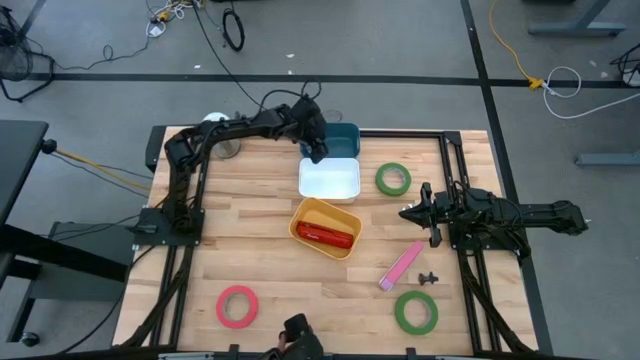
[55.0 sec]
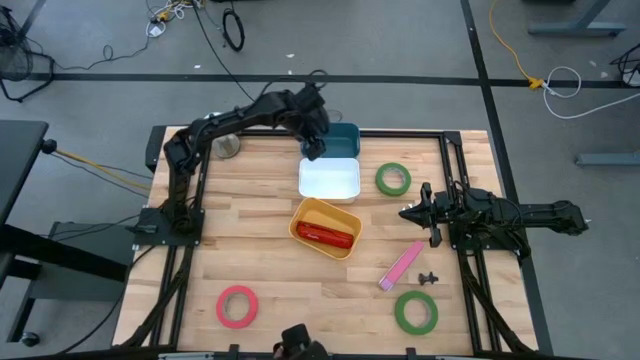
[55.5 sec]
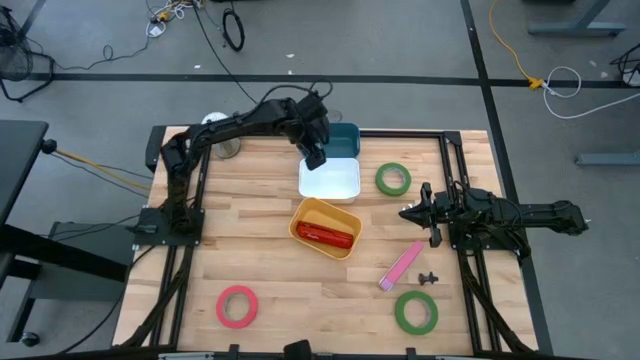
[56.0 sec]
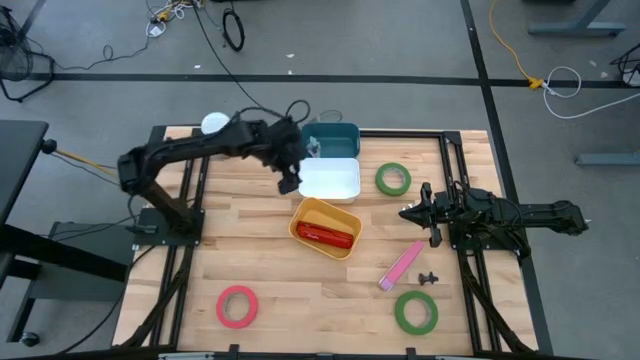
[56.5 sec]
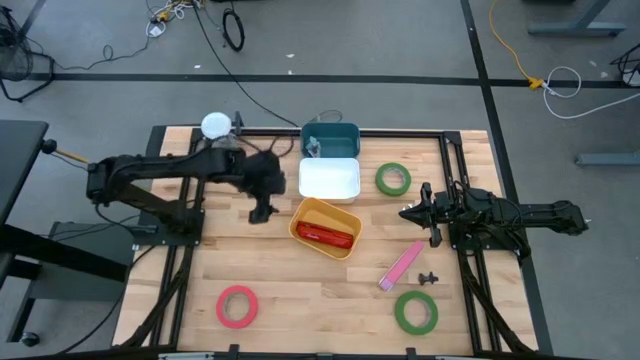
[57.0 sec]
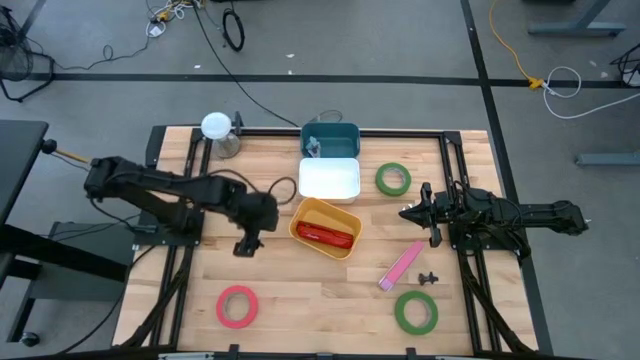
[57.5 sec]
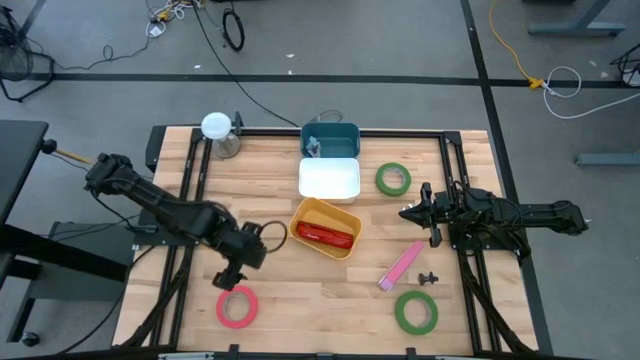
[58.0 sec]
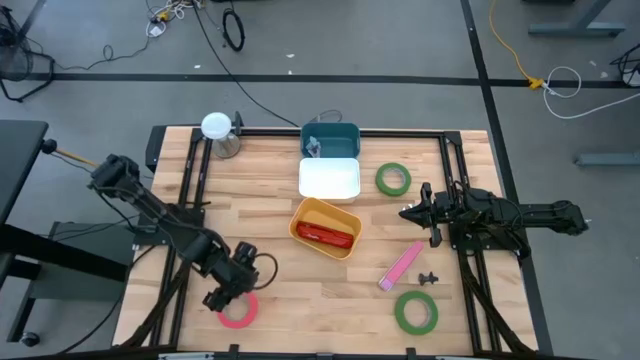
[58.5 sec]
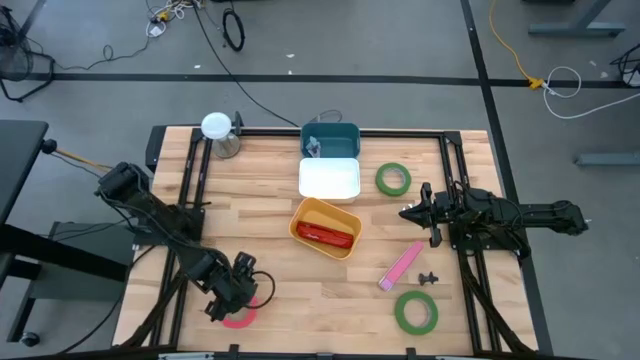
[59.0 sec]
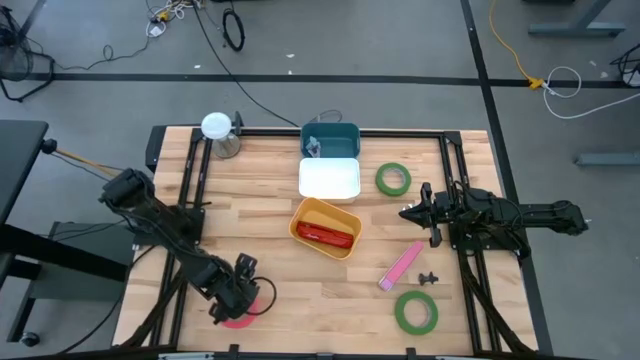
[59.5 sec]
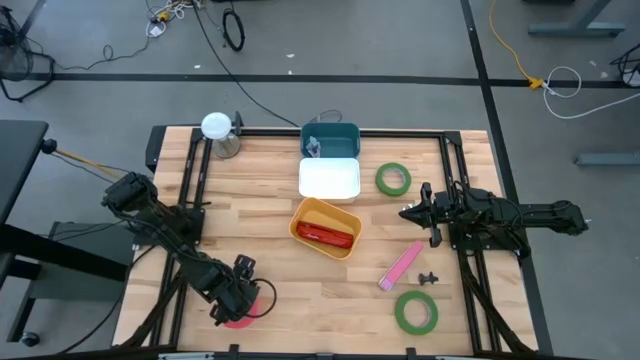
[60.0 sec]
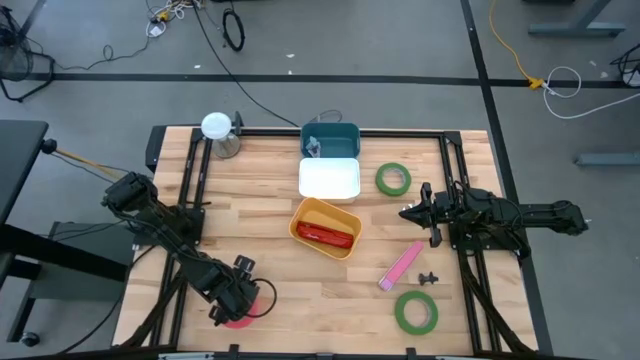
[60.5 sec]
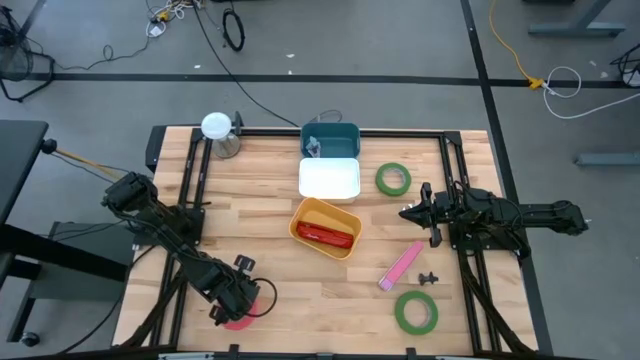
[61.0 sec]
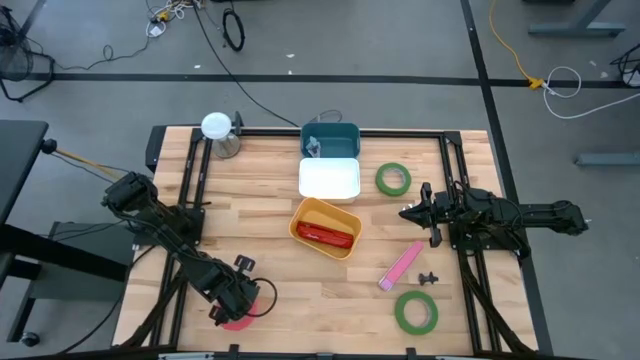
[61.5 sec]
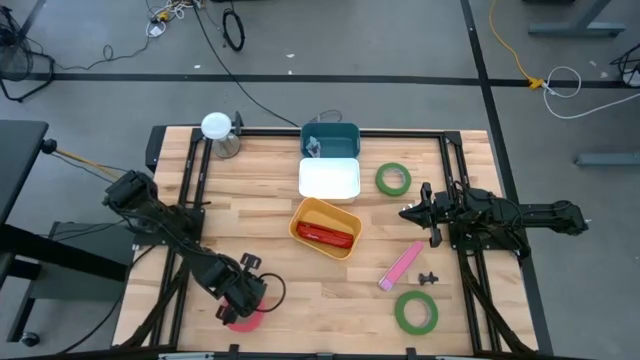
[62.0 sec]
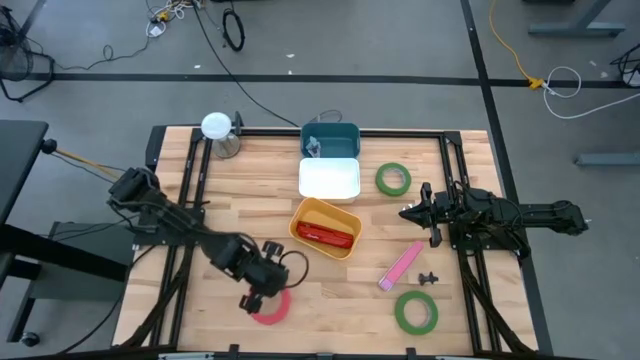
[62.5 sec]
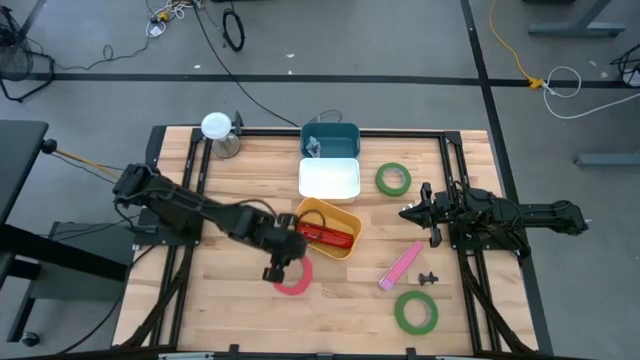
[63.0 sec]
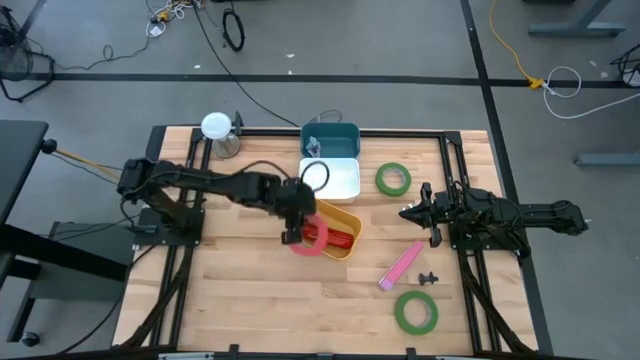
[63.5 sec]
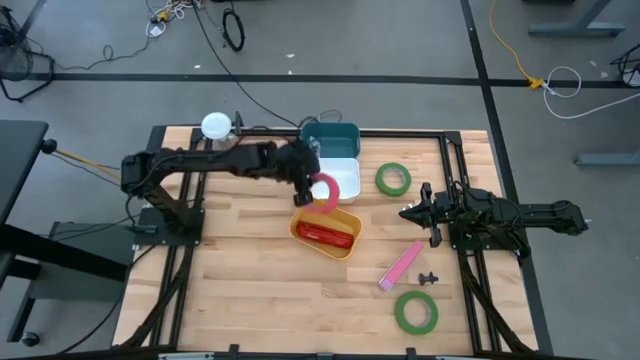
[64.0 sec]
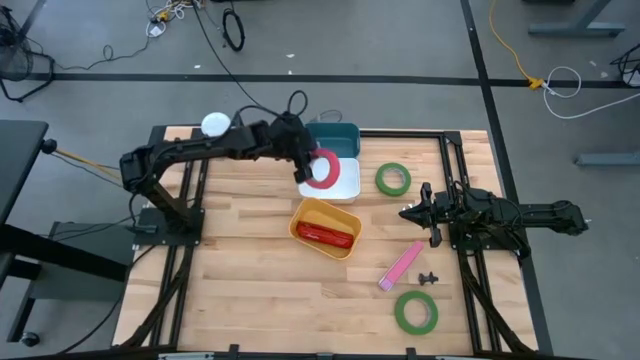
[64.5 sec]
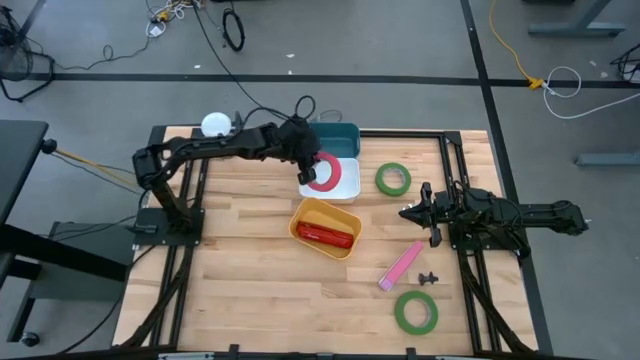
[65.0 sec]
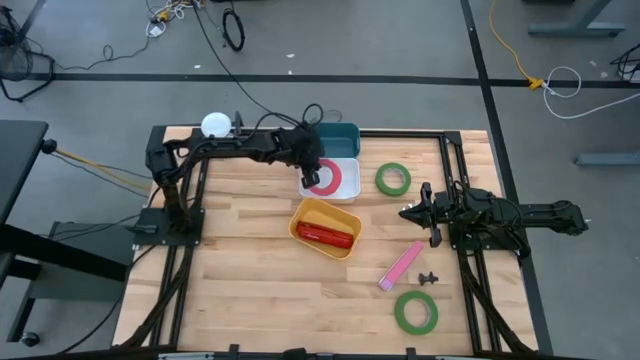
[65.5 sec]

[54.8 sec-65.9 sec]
Task: Pick and place Stapler, Stapler remover, tape
Put the pink tape into the white bin

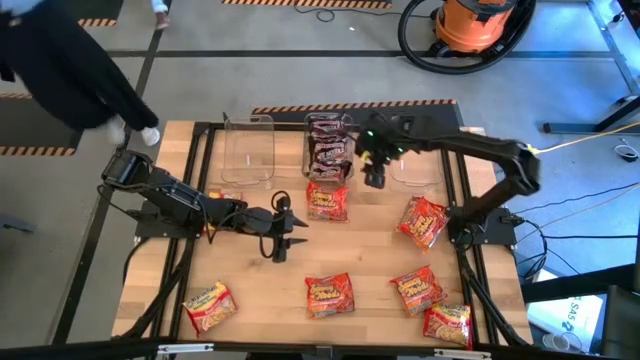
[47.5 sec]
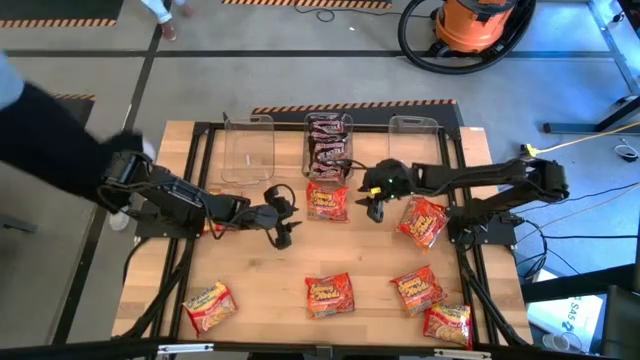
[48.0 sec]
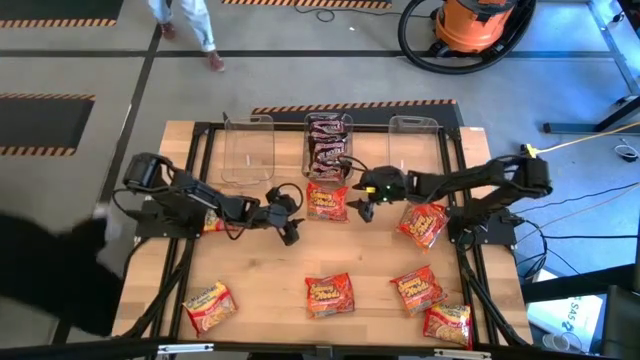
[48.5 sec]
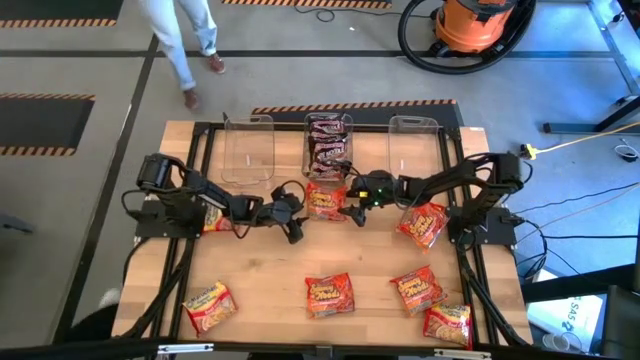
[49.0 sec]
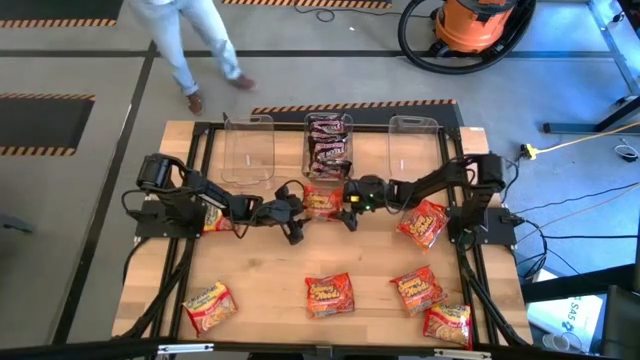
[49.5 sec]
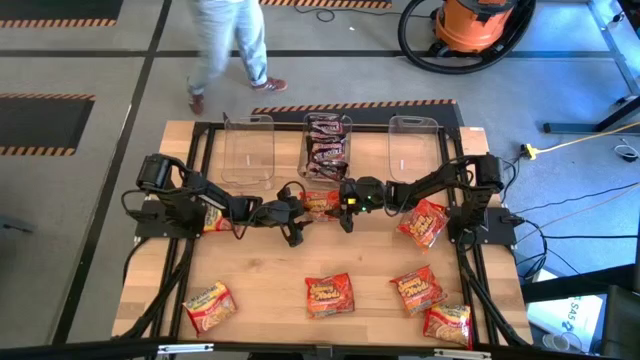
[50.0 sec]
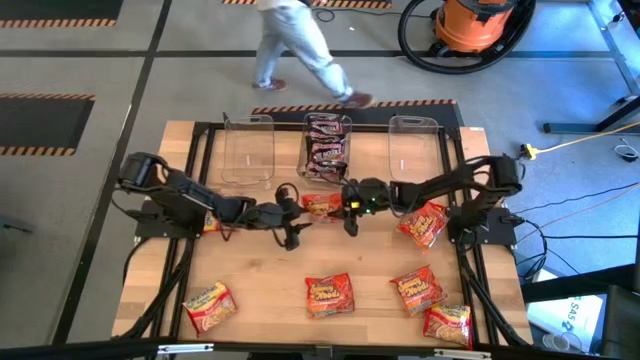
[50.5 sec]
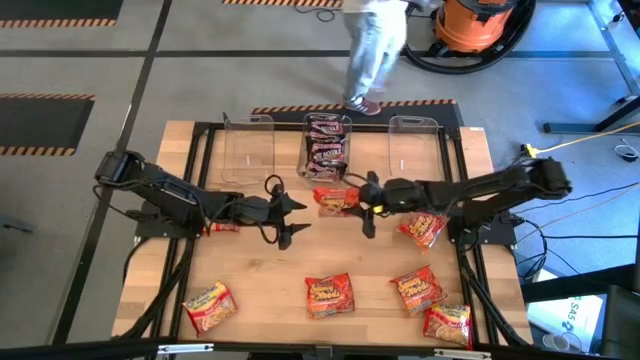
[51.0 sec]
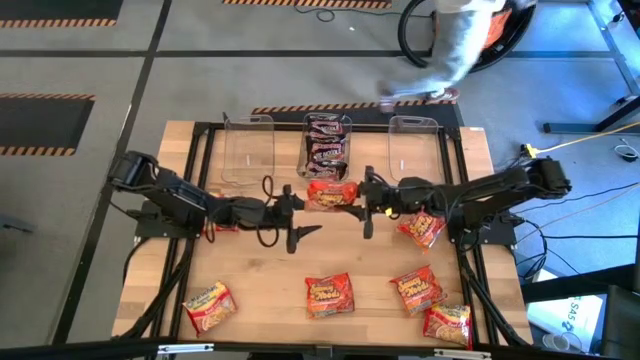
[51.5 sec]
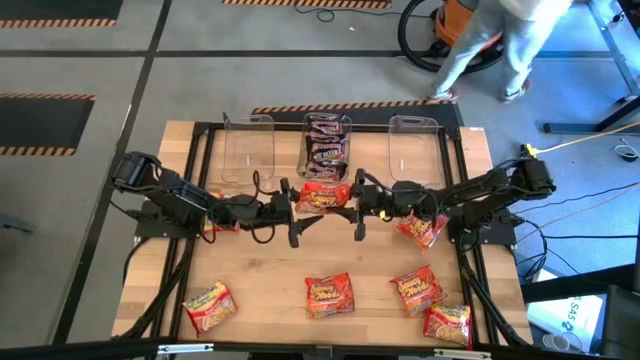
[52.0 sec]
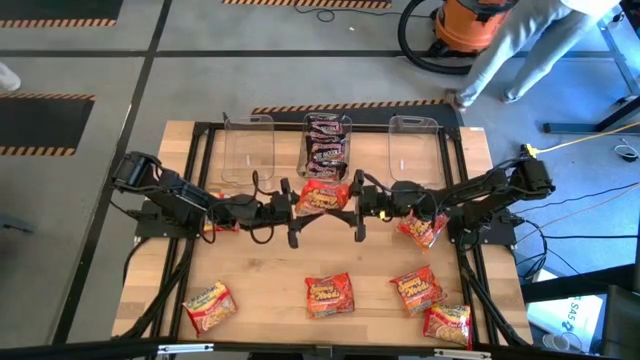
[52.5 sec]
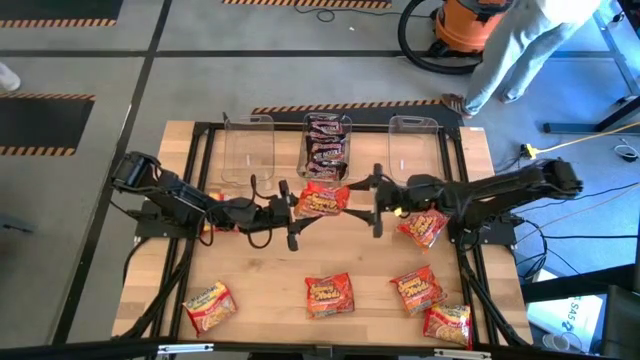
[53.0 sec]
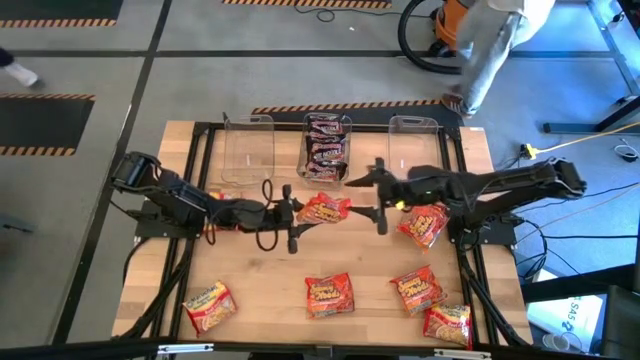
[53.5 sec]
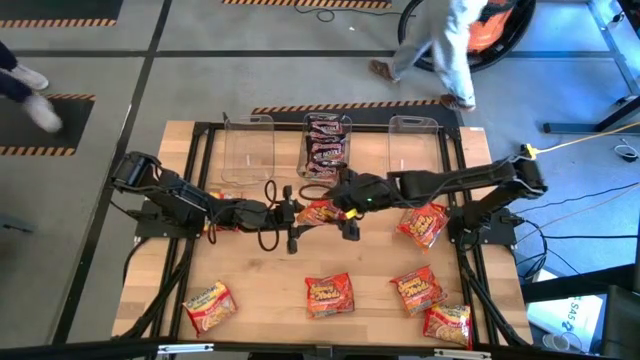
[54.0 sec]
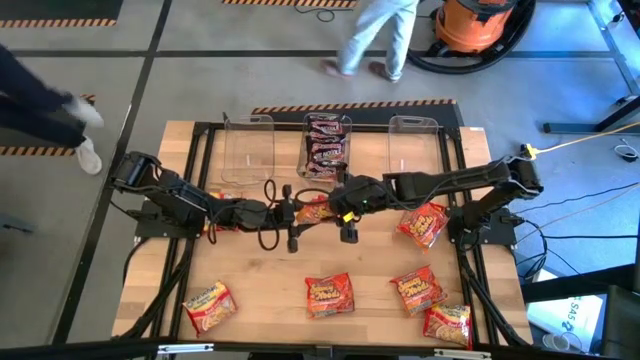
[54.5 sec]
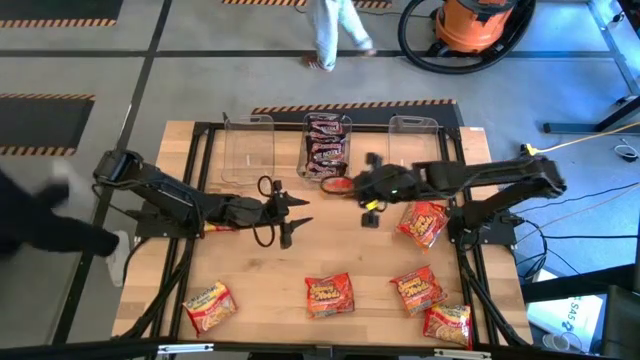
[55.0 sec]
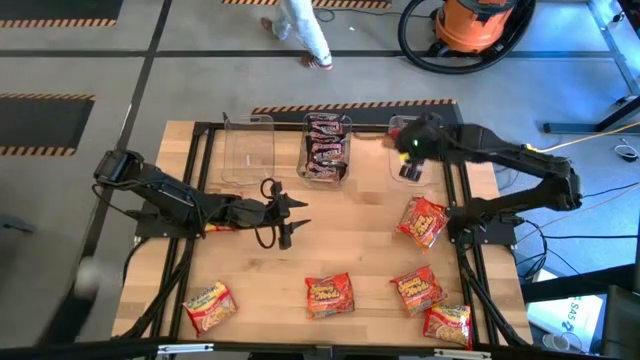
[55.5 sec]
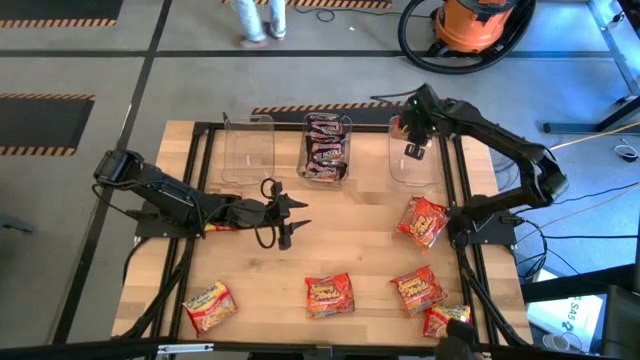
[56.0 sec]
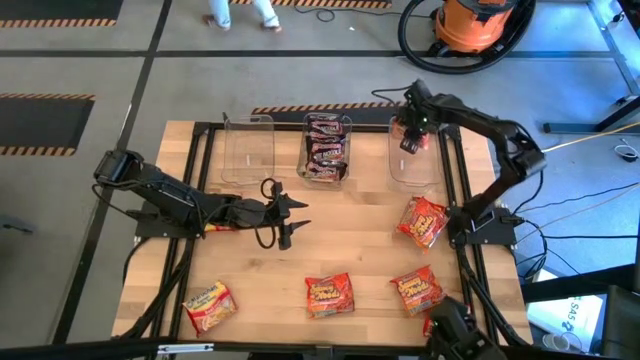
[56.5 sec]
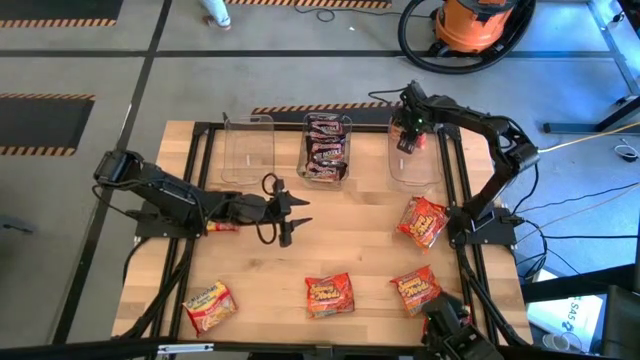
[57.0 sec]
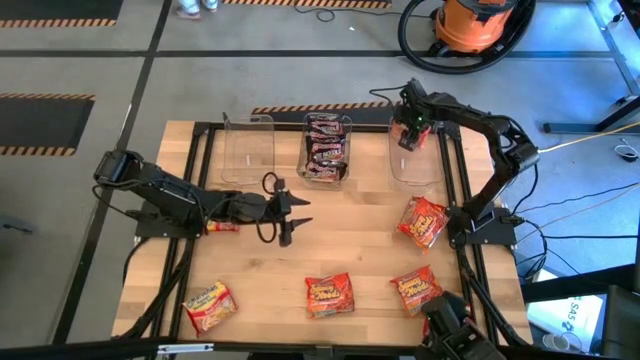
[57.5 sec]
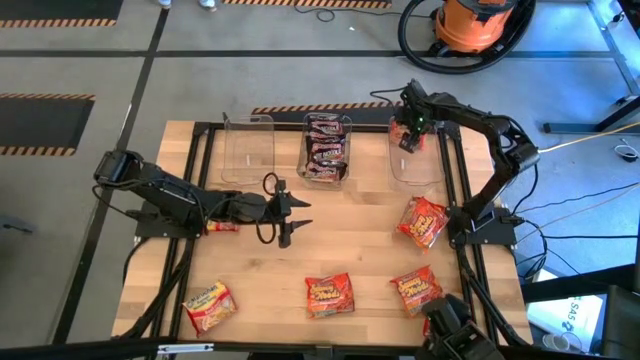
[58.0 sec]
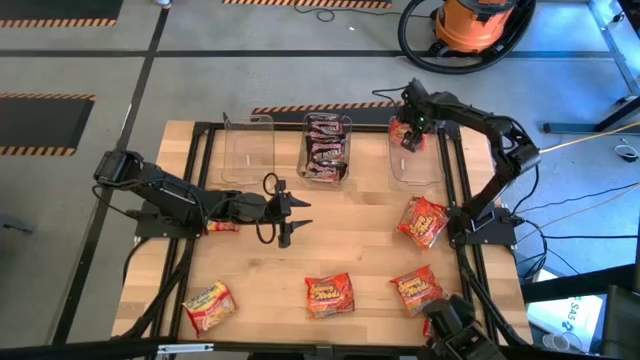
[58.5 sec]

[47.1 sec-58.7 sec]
Task: Sort Maruchan noodles
Put the orange noodle pack into the right transparent bin
